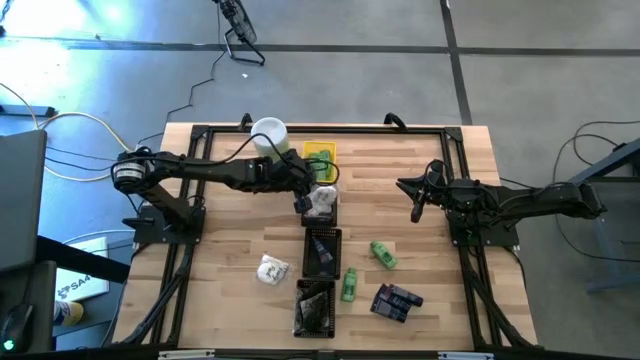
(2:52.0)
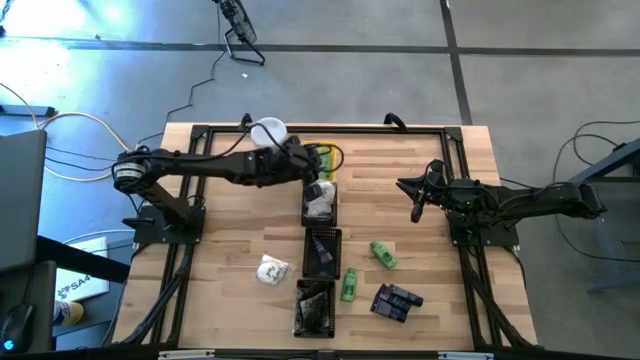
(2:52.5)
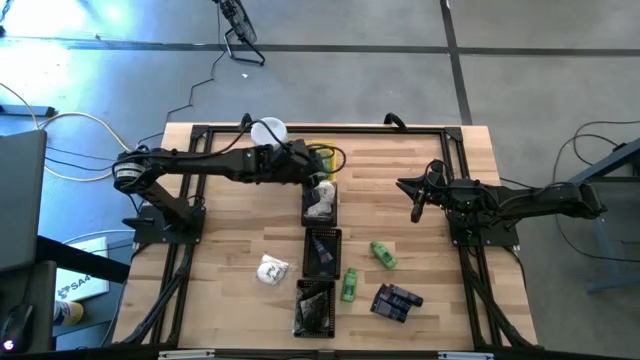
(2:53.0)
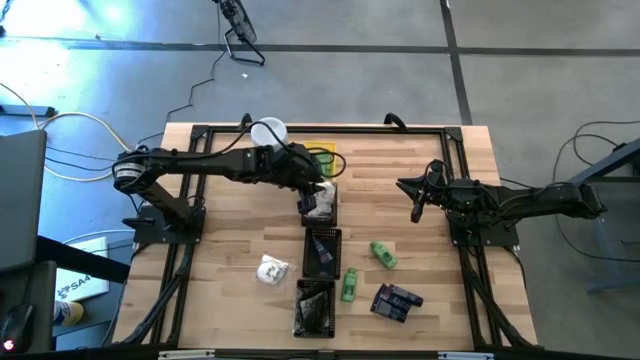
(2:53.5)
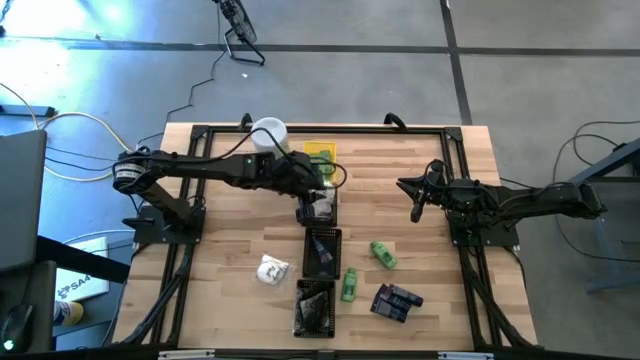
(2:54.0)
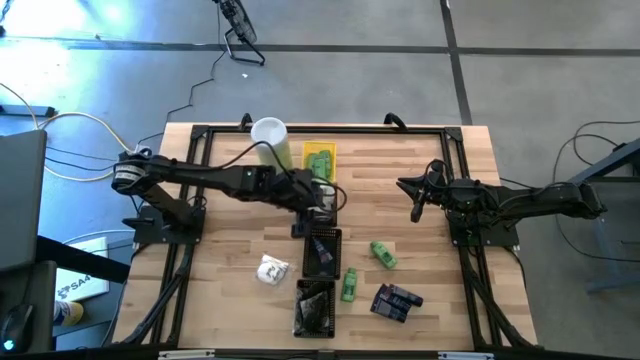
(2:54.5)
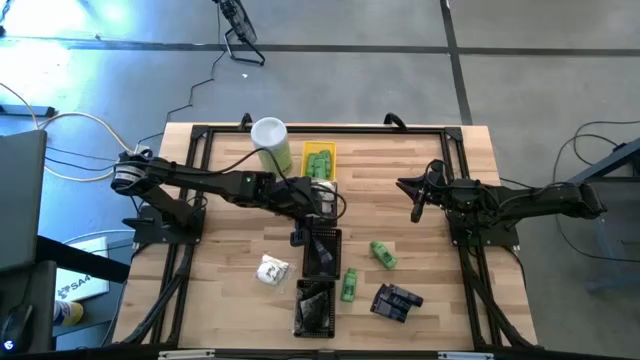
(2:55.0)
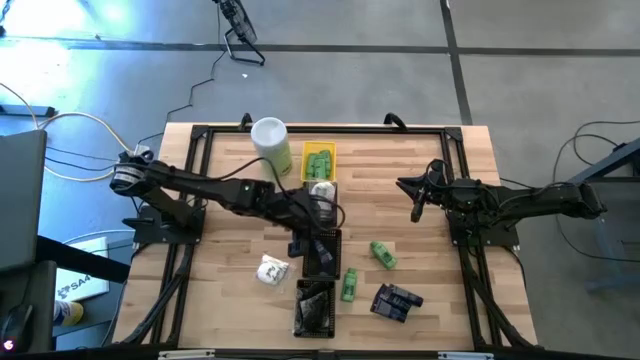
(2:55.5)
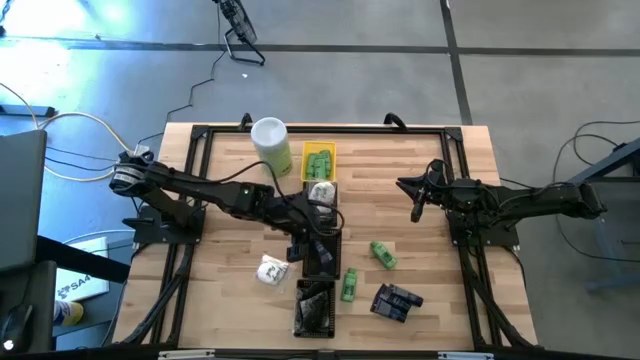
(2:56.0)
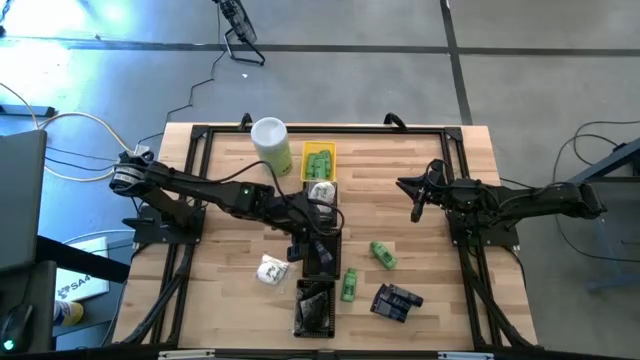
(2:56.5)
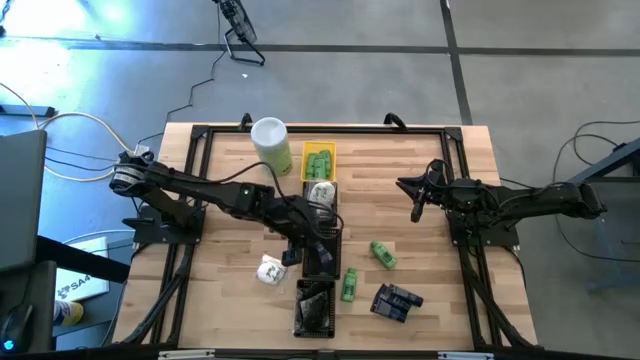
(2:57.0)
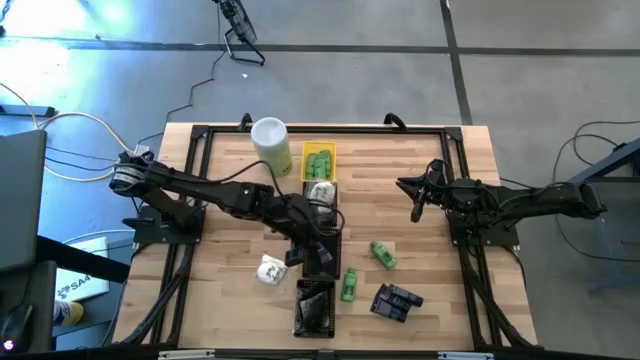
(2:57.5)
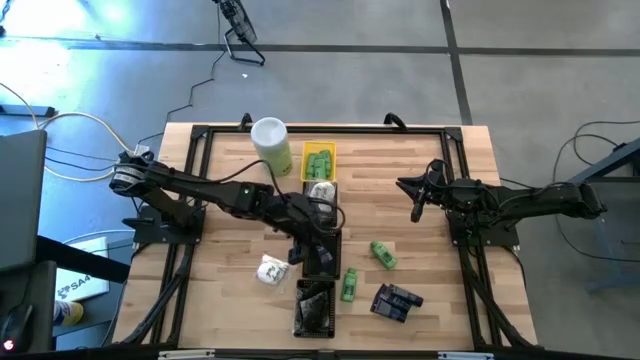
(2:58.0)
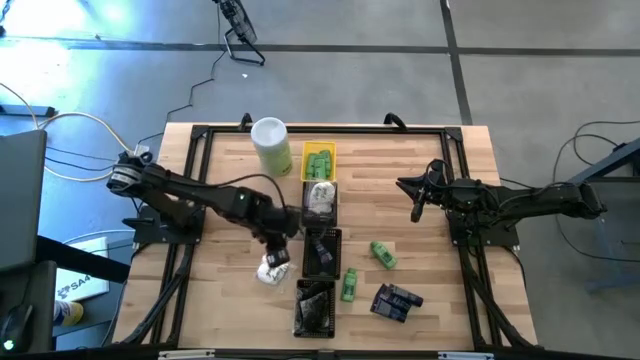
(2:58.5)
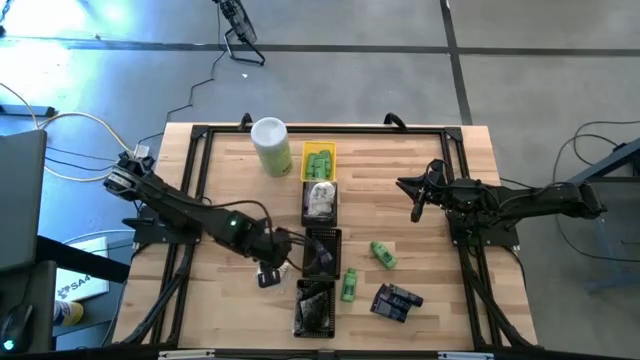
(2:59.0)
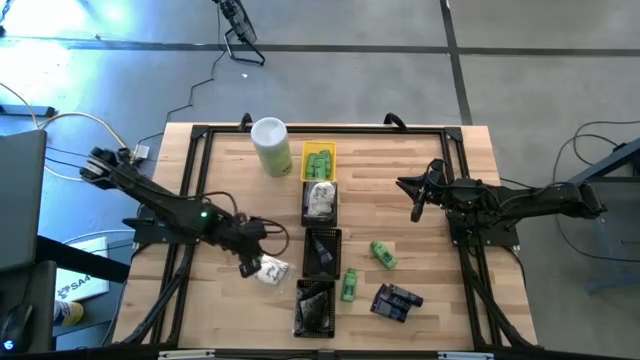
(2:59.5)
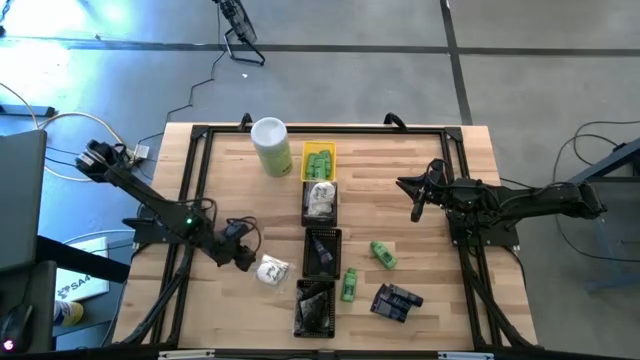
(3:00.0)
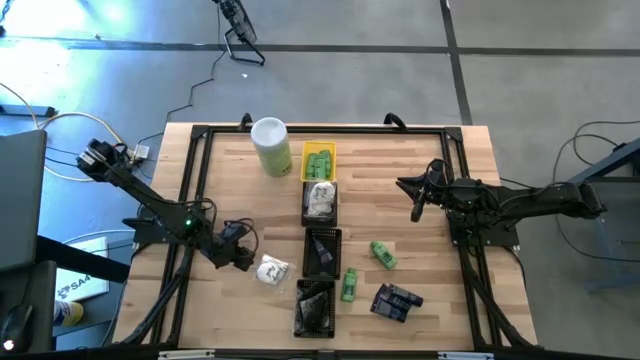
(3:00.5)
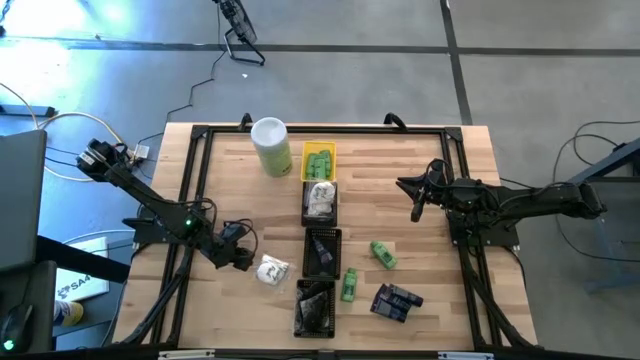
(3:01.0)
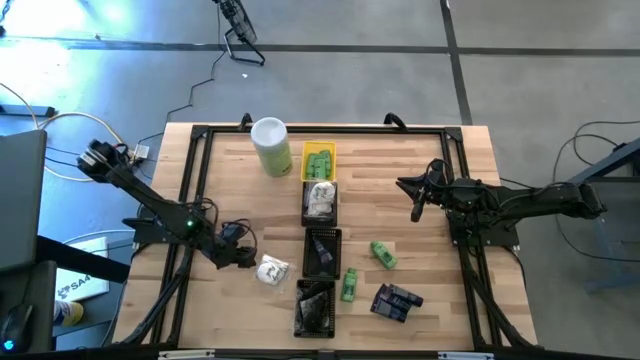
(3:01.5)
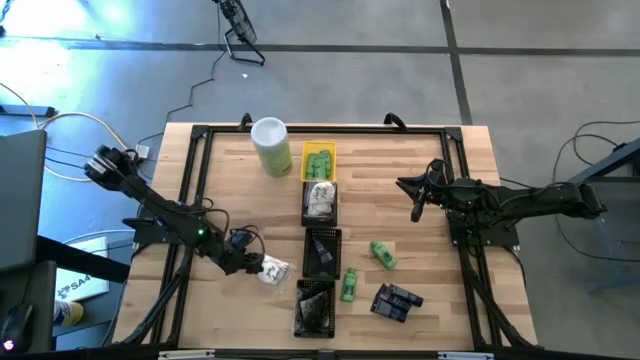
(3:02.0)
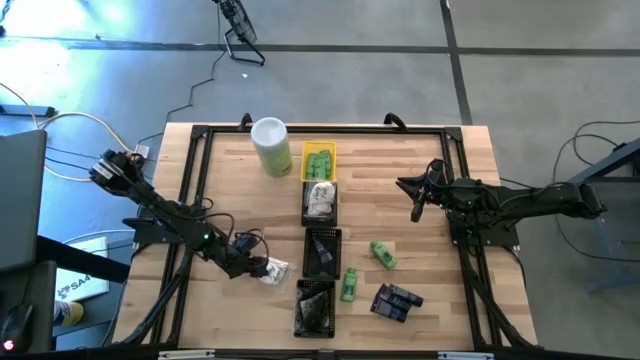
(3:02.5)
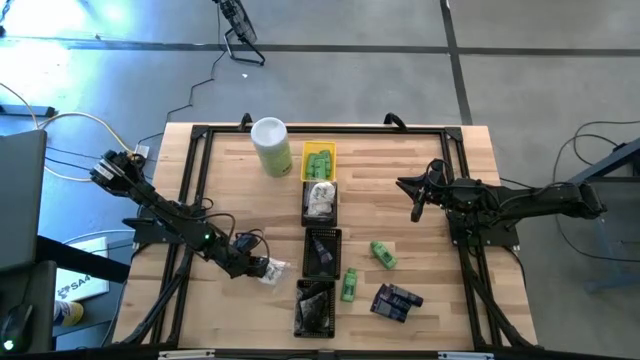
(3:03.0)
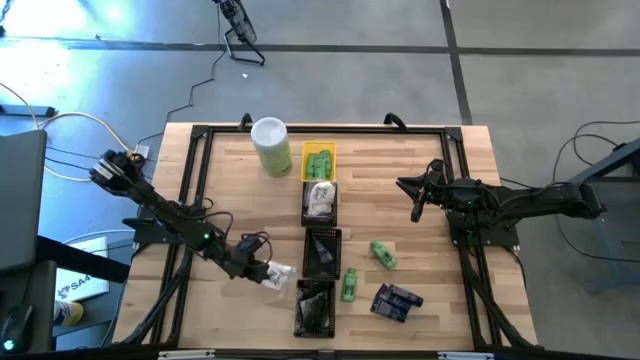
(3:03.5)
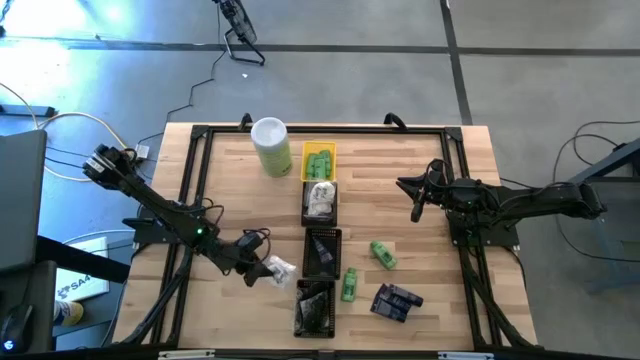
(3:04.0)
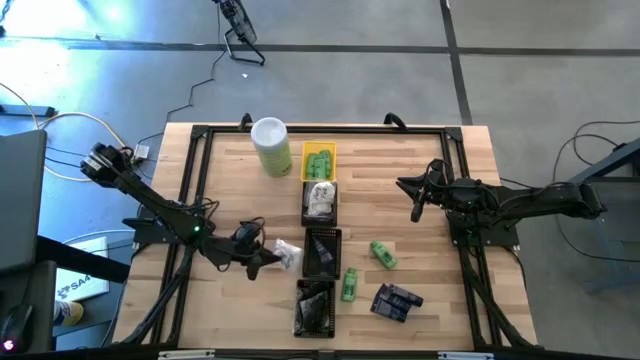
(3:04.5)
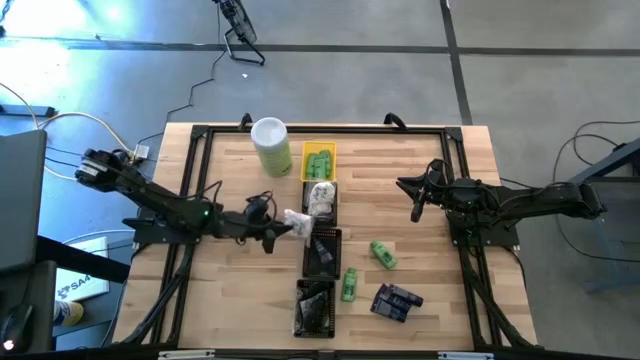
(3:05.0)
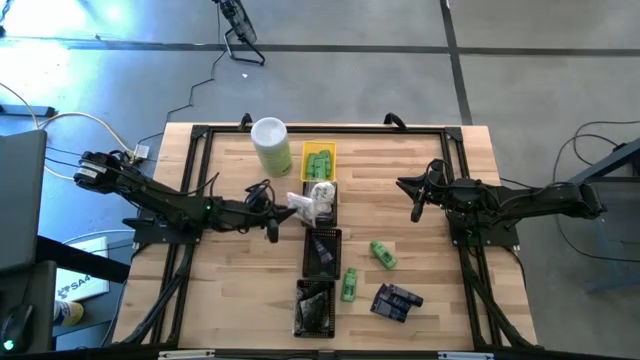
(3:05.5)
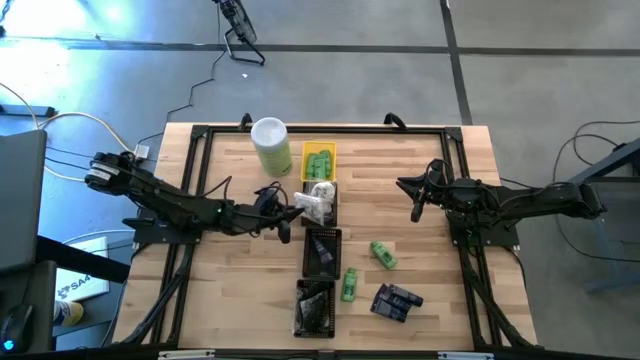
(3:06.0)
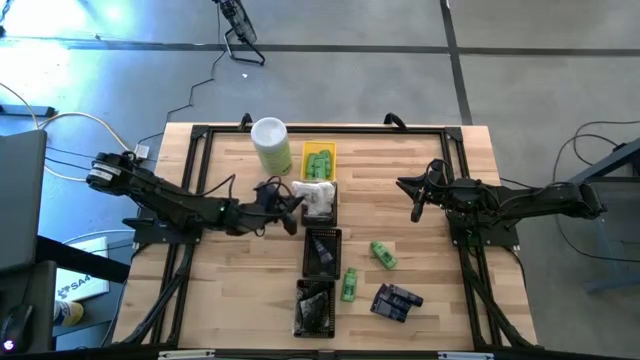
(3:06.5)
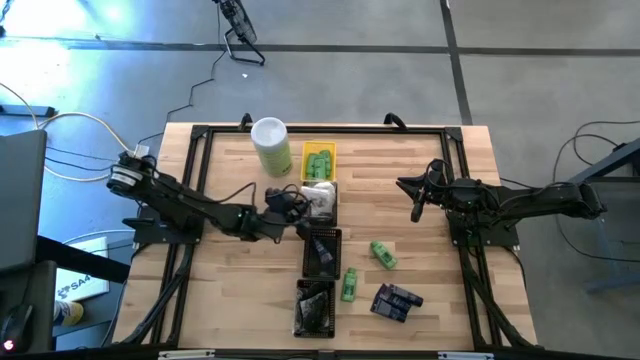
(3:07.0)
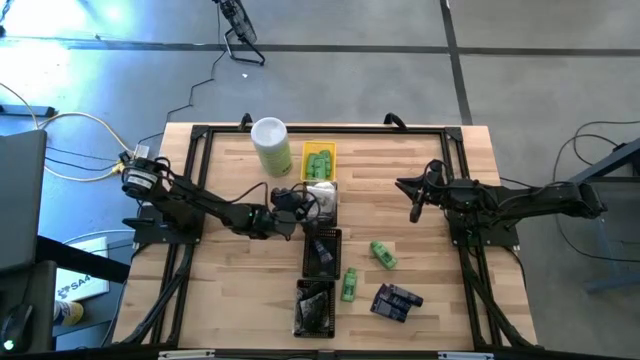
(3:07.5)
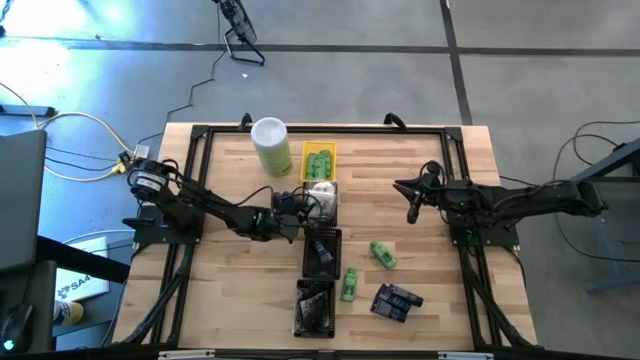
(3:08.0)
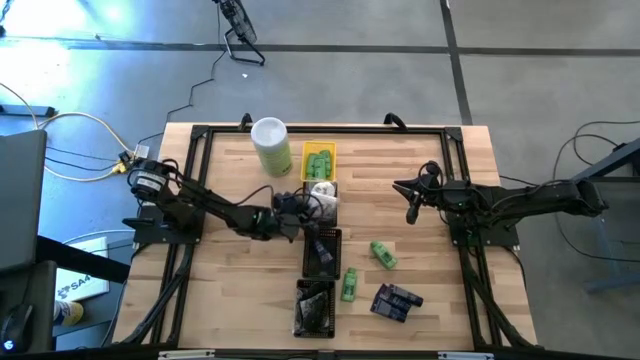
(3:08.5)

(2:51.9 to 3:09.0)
Task: Pick & Place Travel size toiletries
Put the white vanity pack into the top black basket

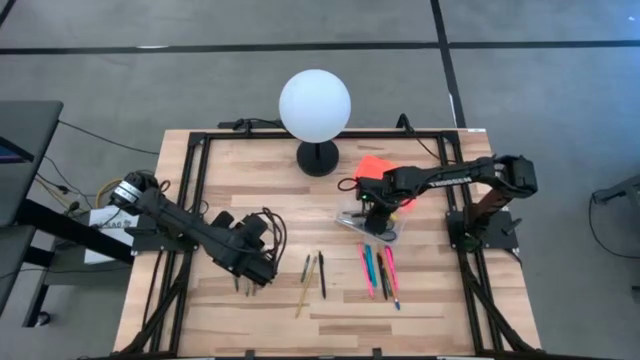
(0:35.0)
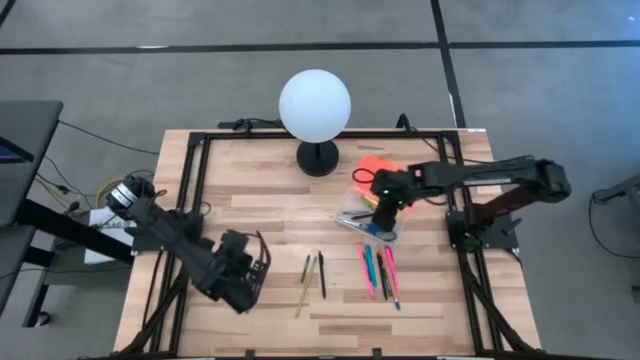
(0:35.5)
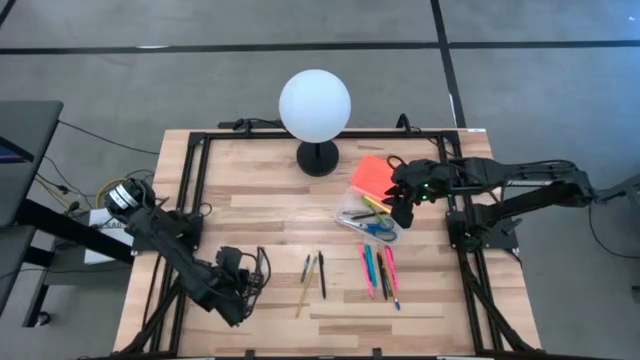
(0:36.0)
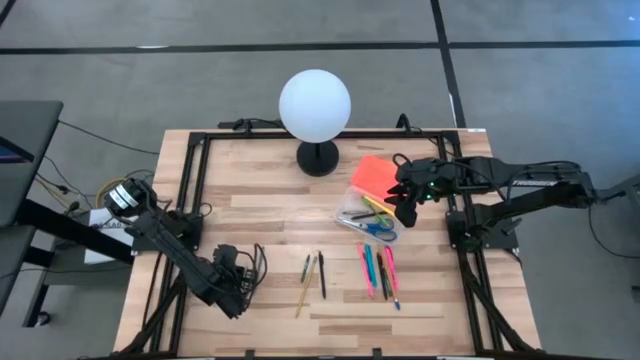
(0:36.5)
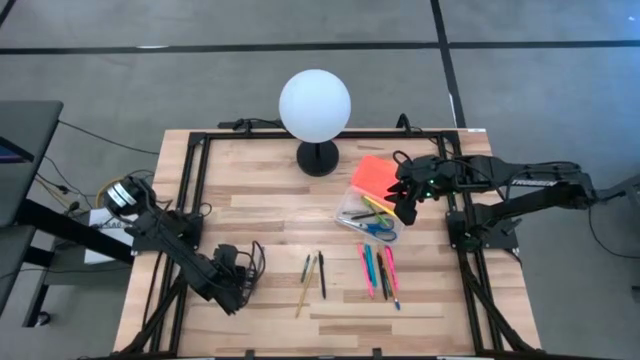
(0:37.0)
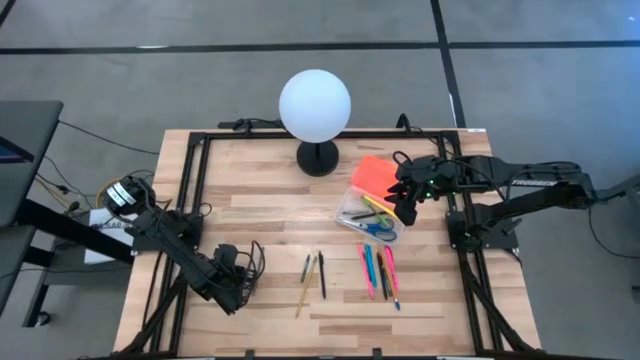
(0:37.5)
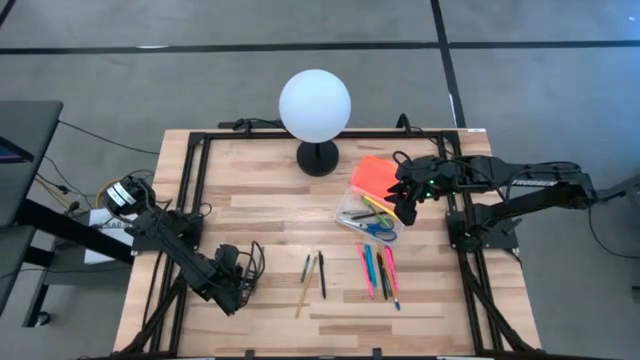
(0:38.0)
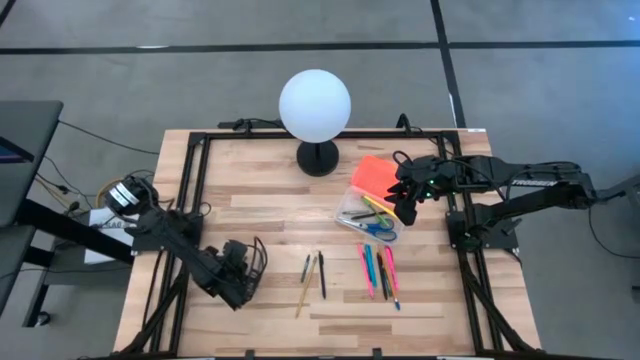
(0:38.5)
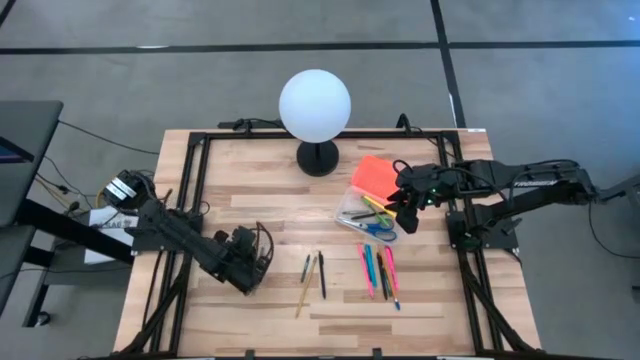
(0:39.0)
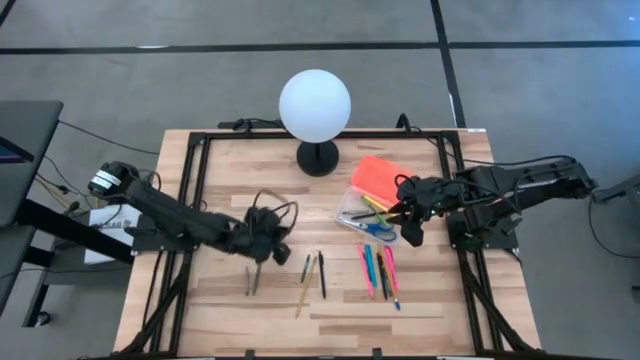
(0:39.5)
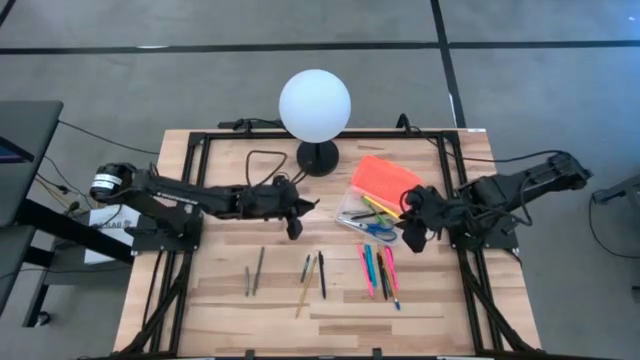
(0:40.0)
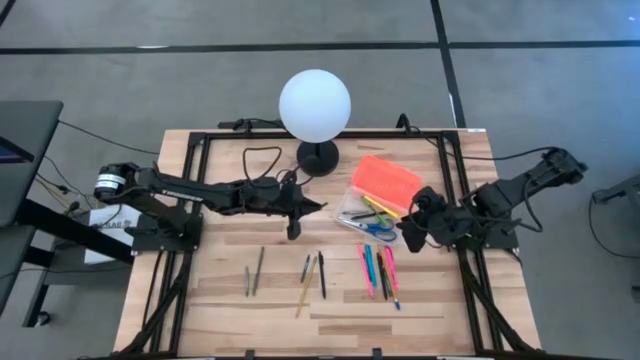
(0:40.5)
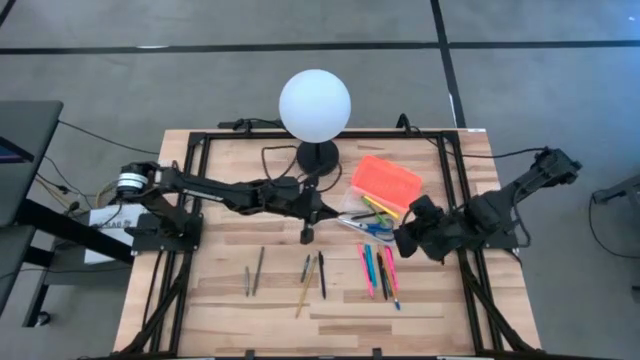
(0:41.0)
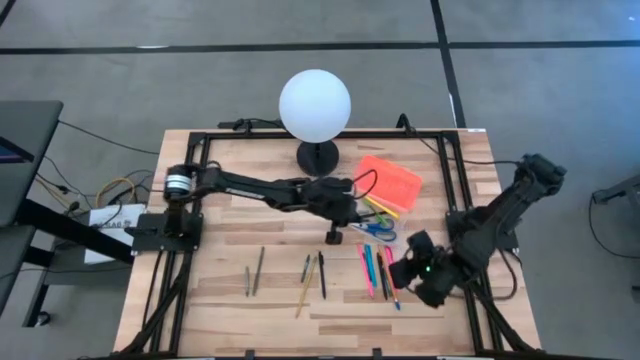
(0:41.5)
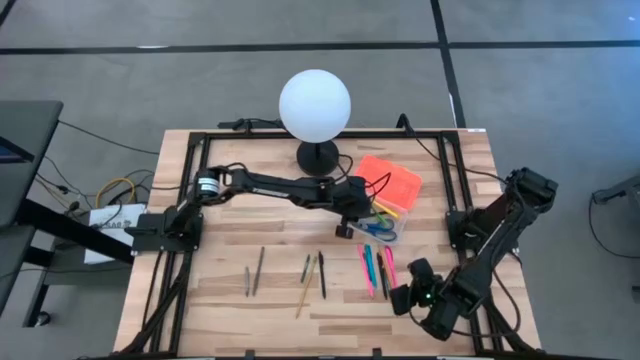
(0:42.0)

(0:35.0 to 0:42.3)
Task: Pick & place school supplies into a supply box
Put the green crayon into the orange supply box
